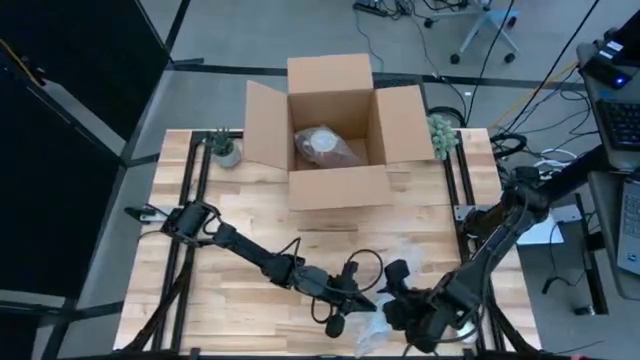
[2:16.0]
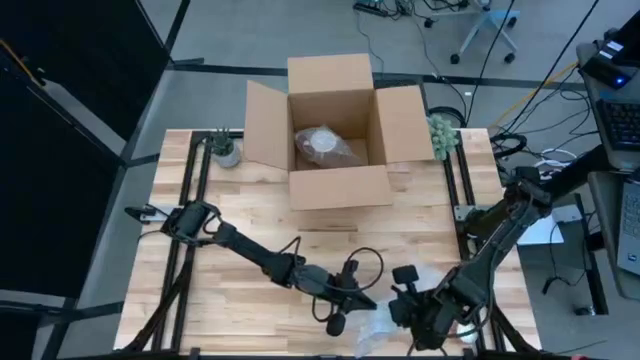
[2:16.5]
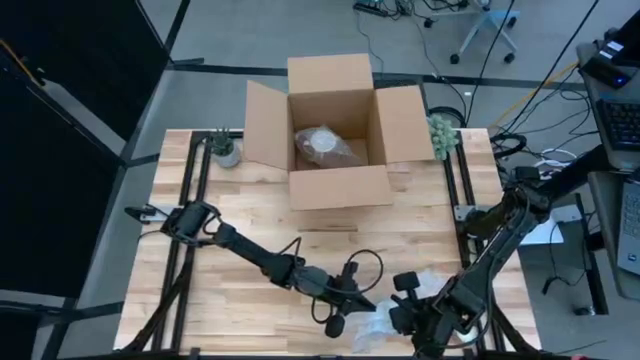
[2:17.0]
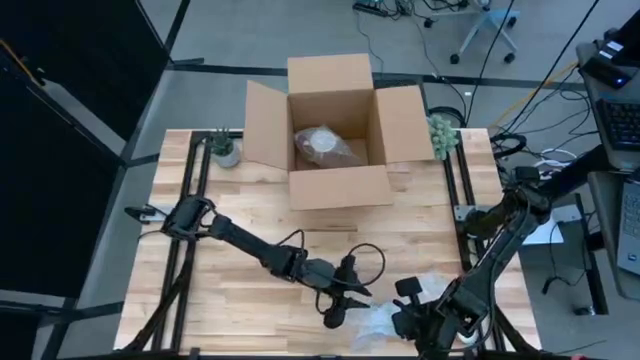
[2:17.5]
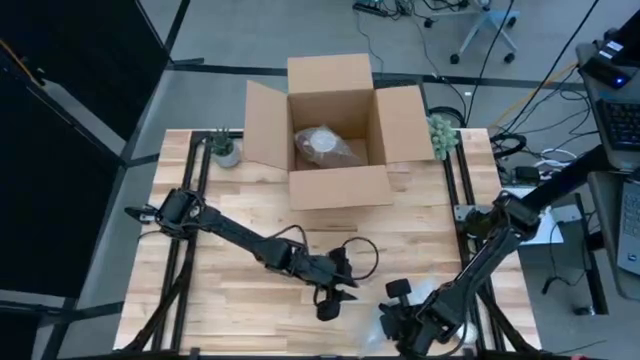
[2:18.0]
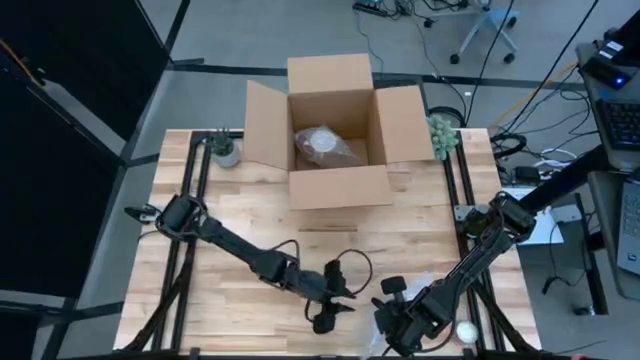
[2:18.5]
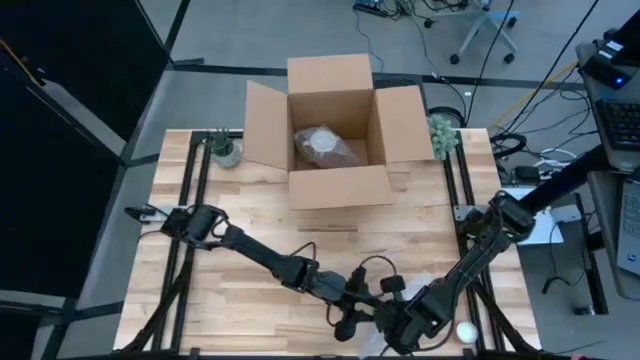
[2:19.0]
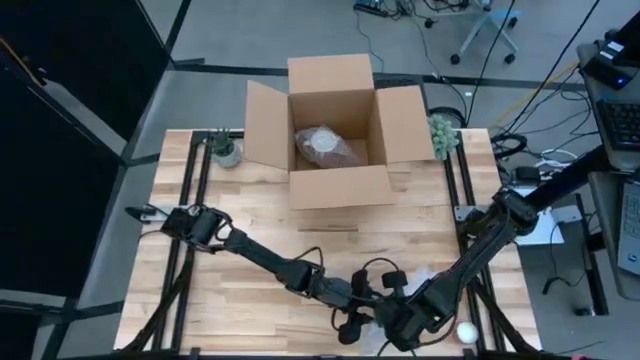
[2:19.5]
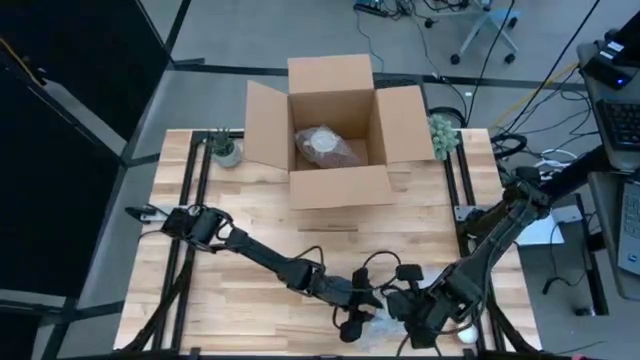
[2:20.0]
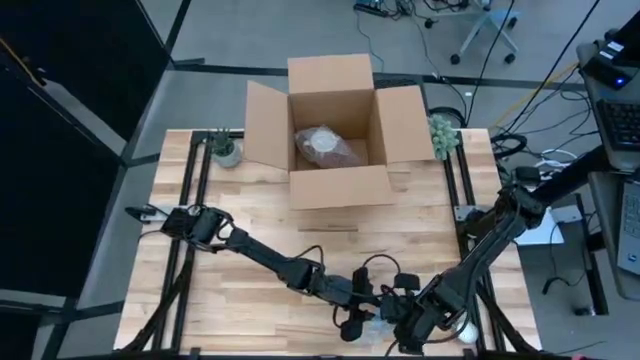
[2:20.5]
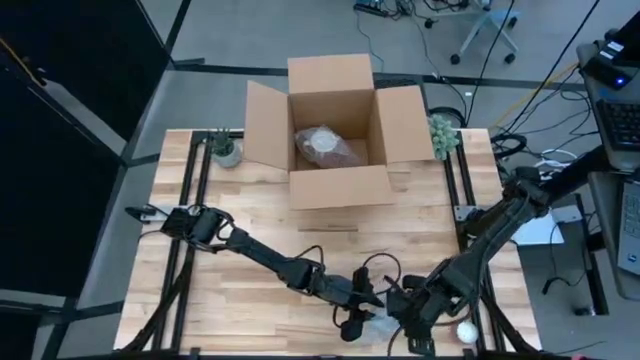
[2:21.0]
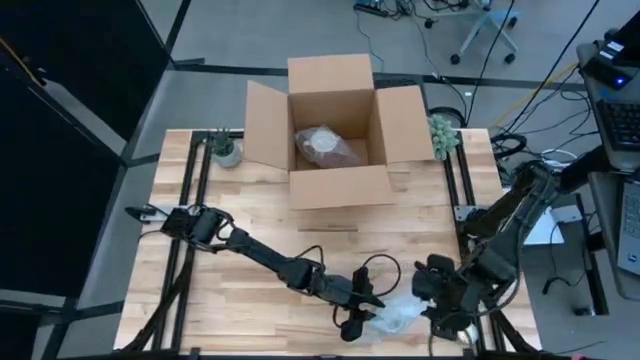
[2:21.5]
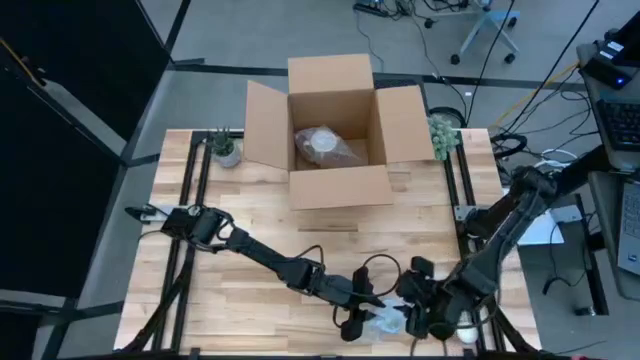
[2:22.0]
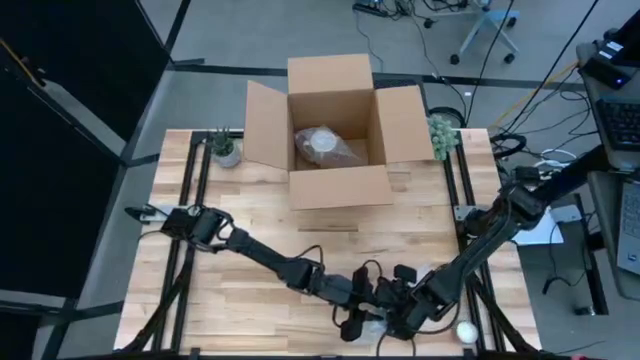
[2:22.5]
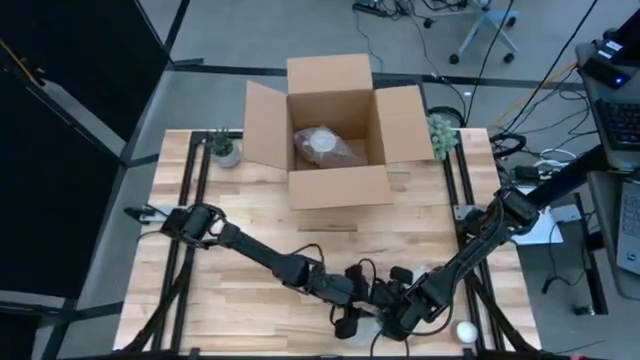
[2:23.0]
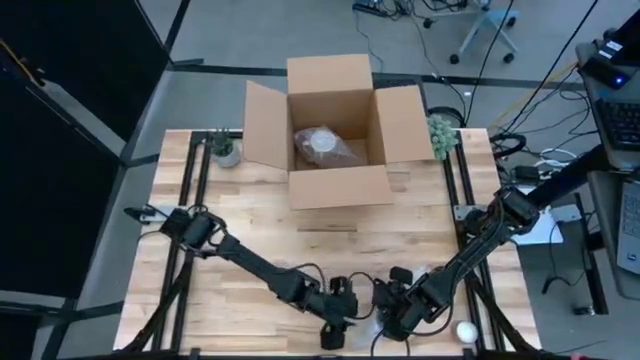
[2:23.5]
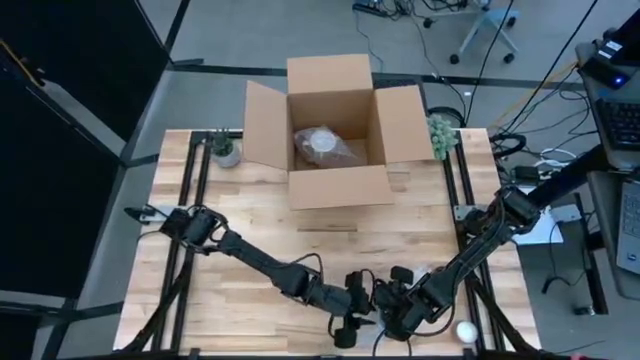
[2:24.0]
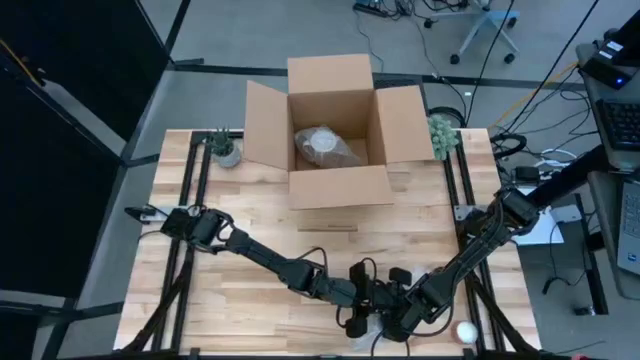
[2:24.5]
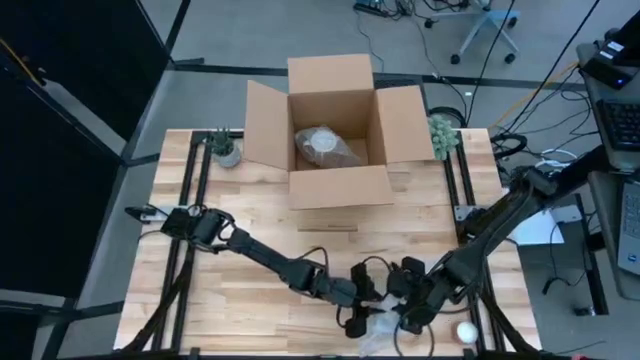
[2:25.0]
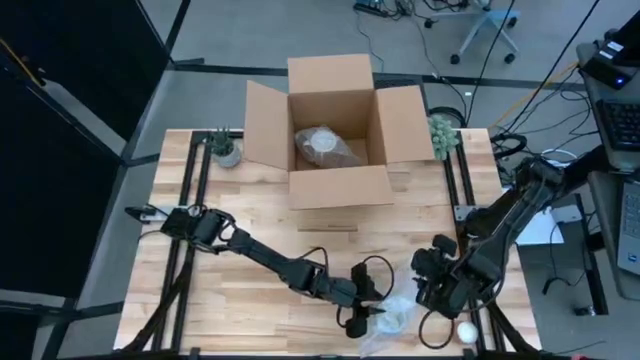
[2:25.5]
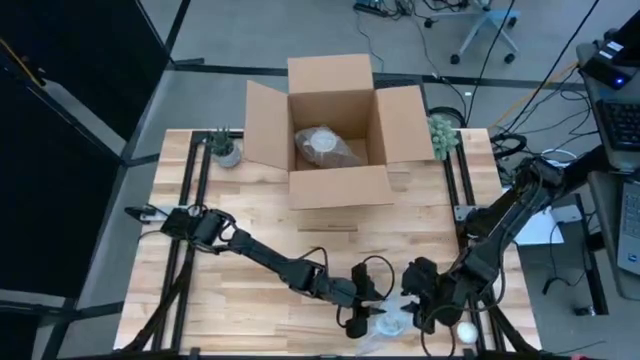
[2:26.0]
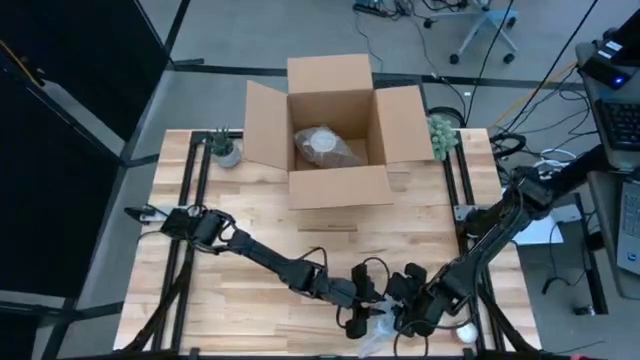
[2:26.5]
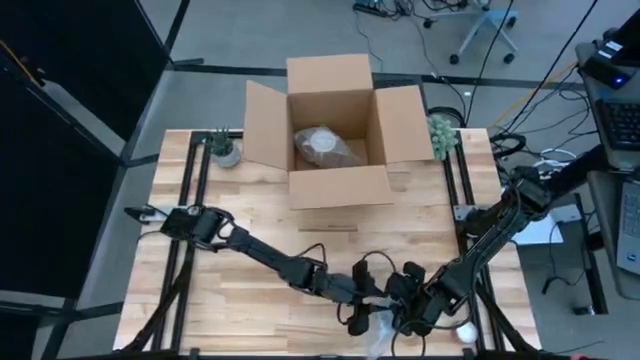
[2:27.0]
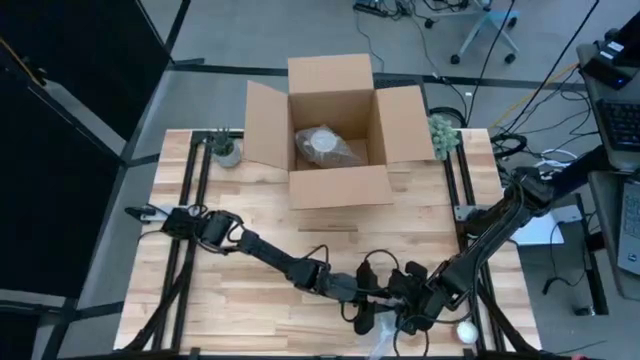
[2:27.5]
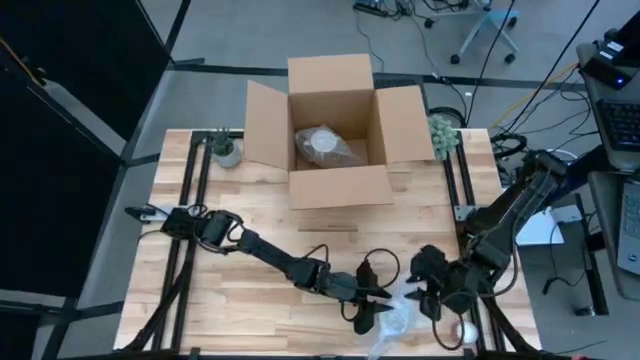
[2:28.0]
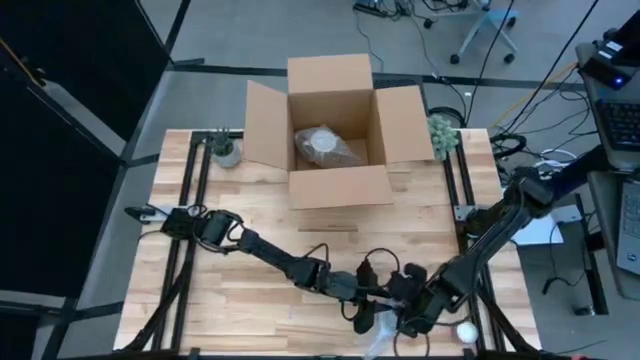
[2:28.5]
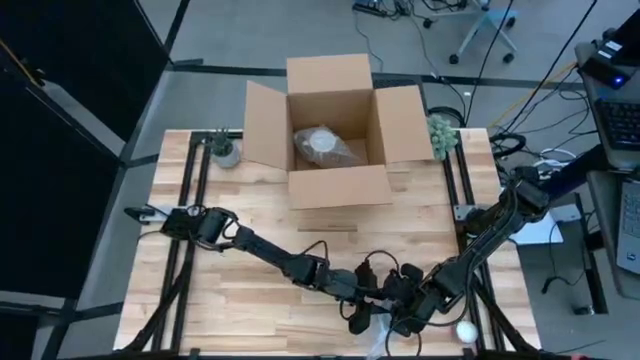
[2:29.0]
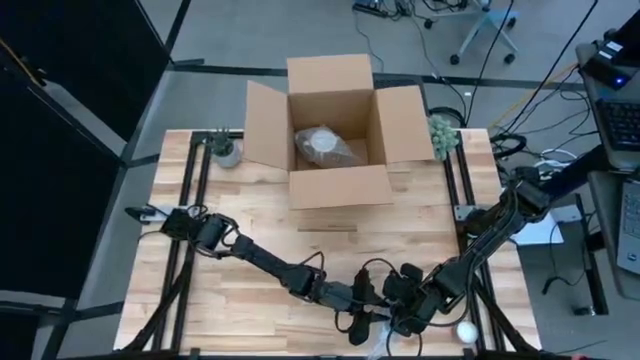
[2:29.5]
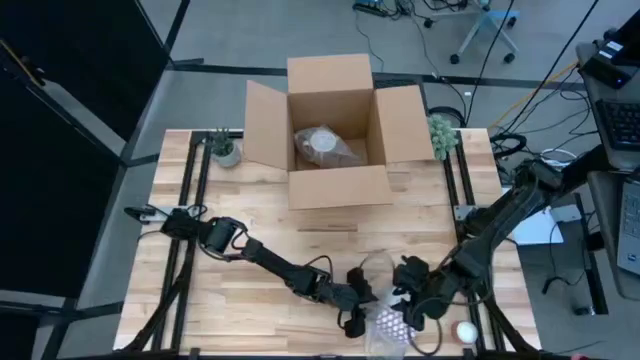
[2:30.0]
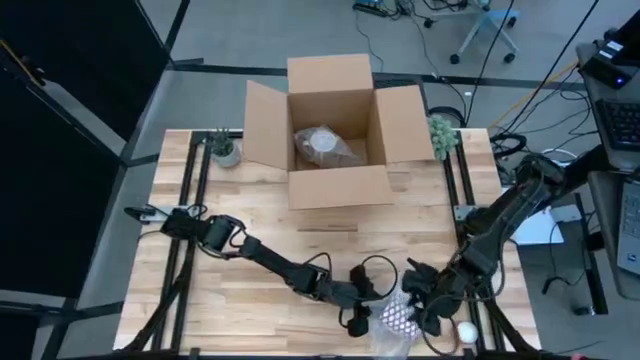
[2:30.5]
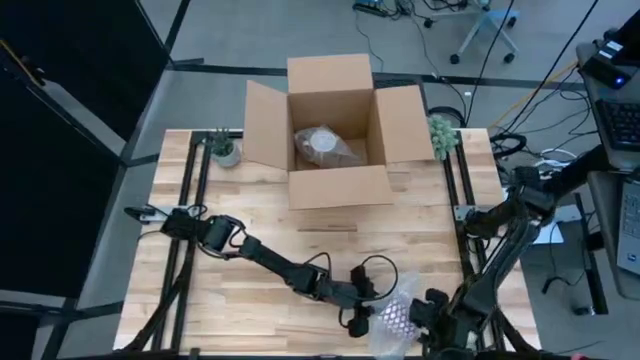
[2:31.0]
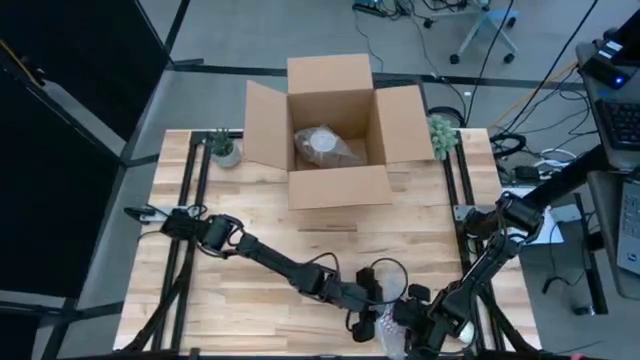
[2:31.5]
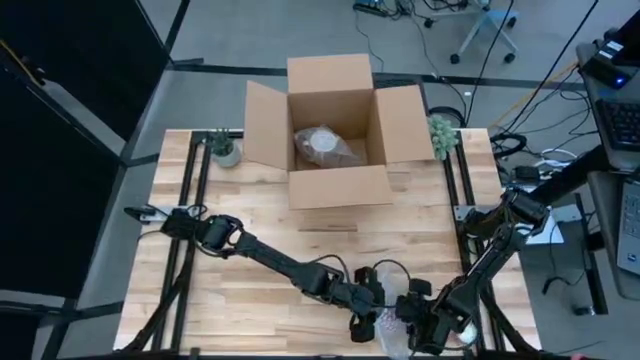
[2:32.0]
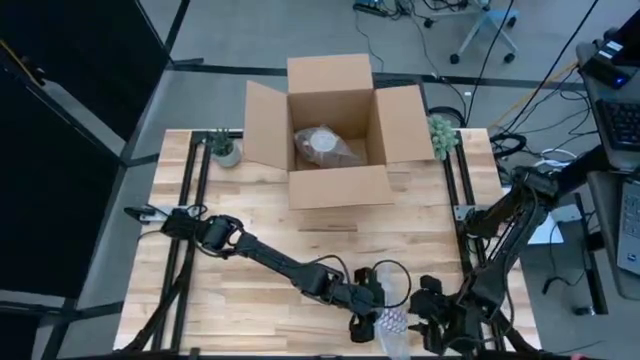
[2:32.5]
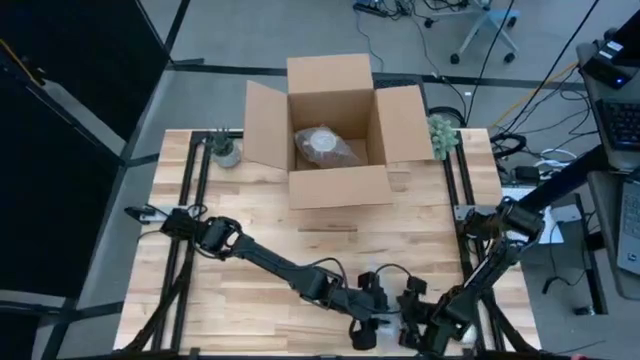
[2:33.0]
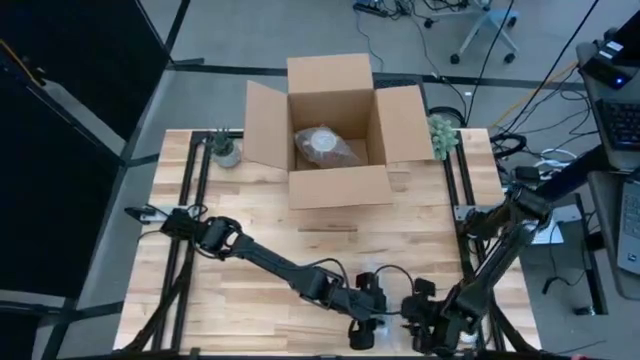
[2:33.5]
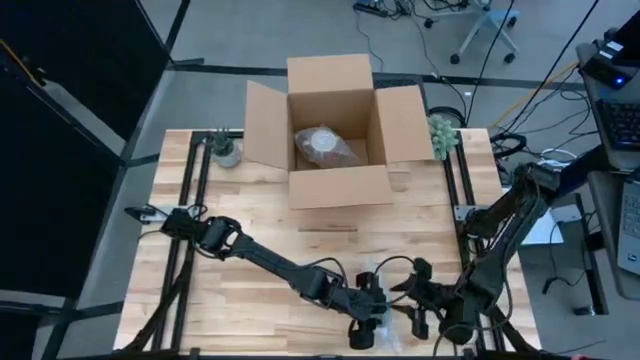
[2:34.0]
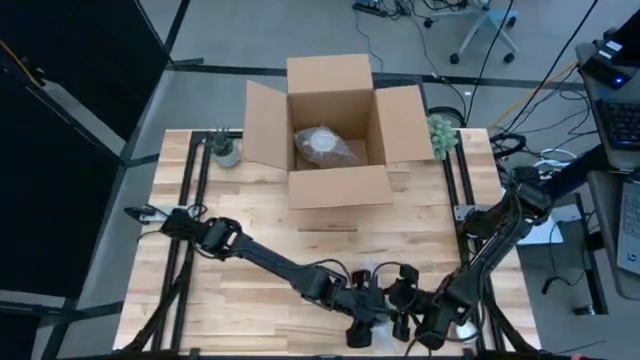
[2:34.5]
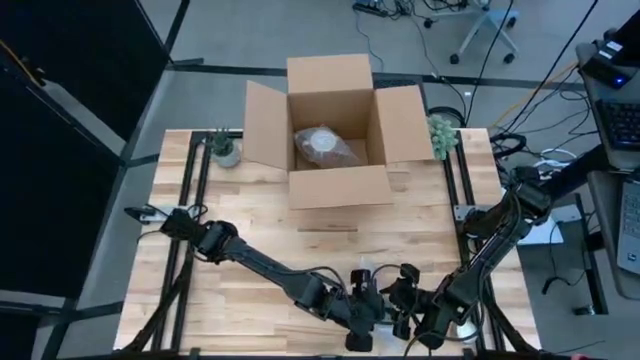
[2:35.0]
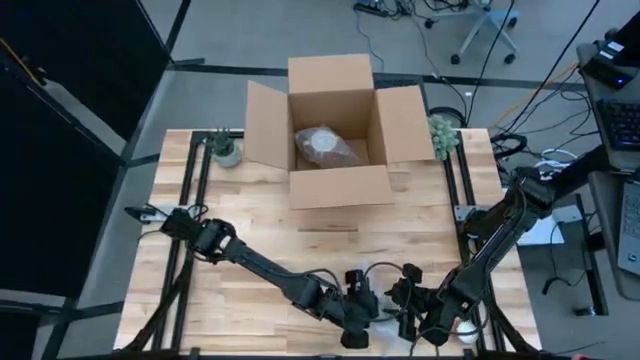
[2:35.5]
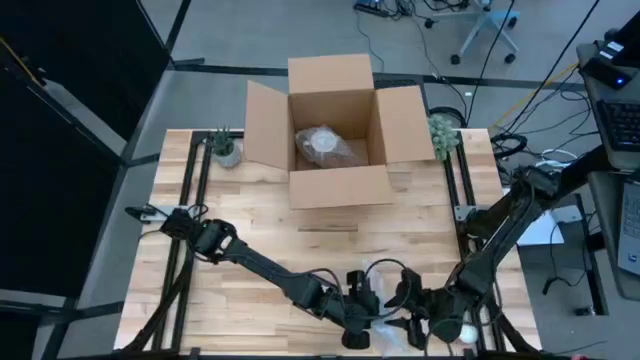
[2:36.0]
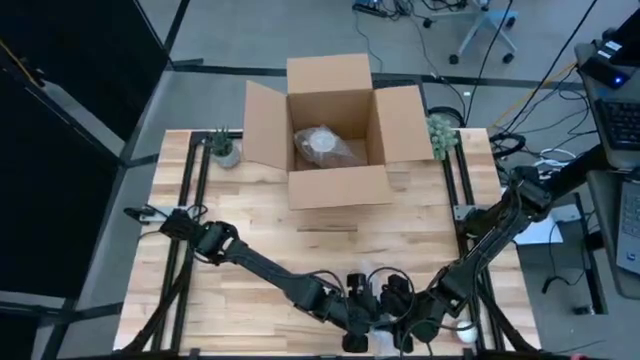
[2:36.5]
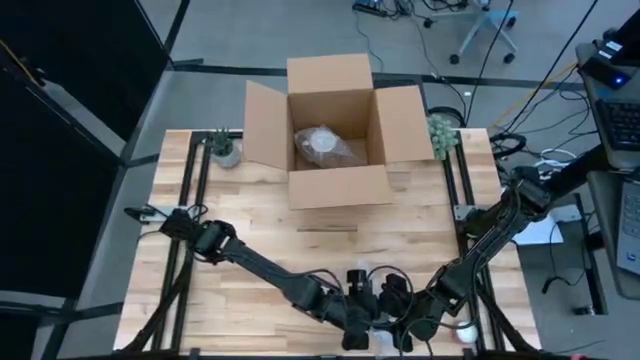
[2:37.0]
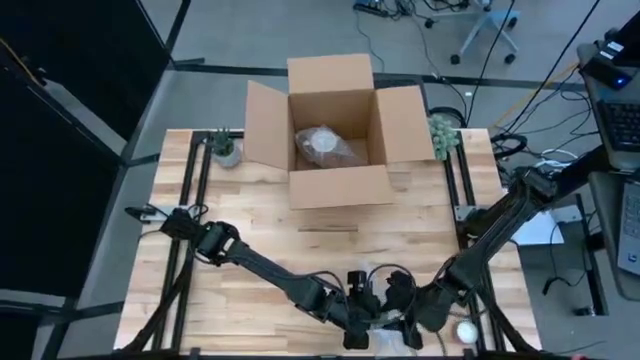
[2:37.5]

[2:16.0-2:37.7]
Task: wrap mug
Wrap the red mug with the bubble wrap
